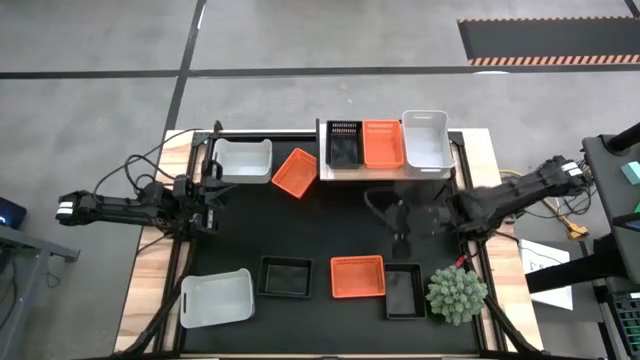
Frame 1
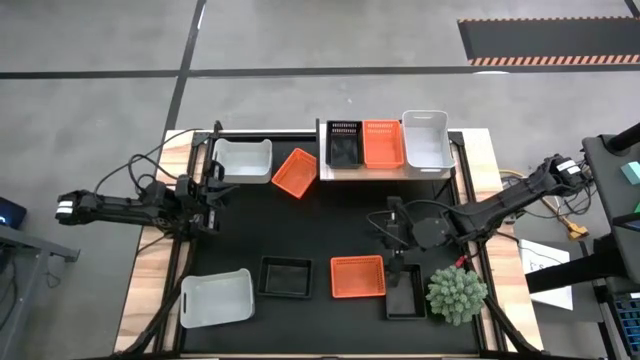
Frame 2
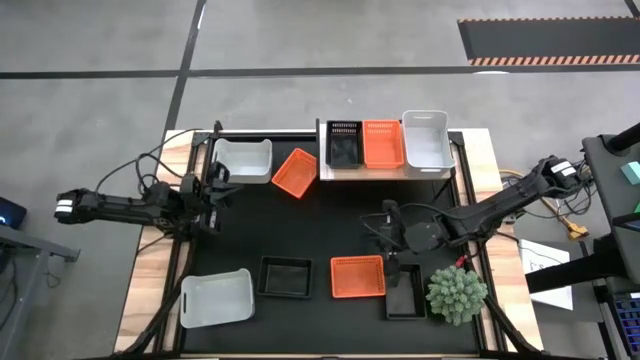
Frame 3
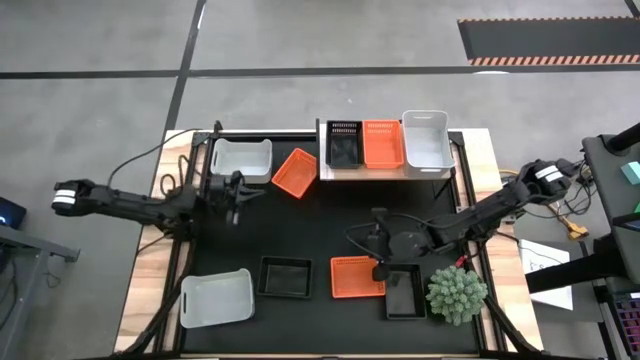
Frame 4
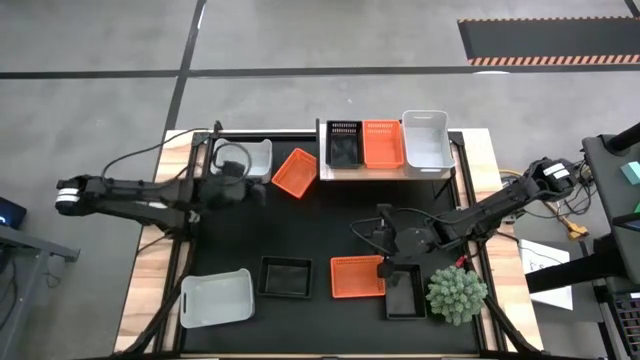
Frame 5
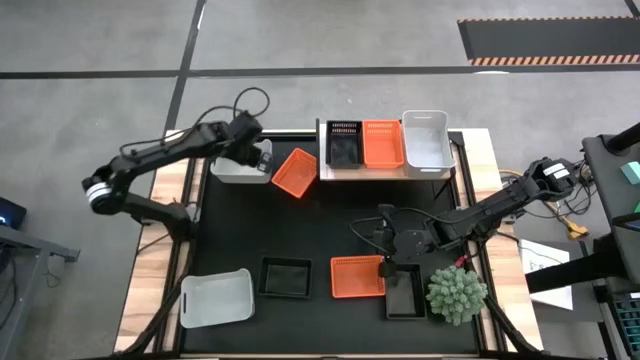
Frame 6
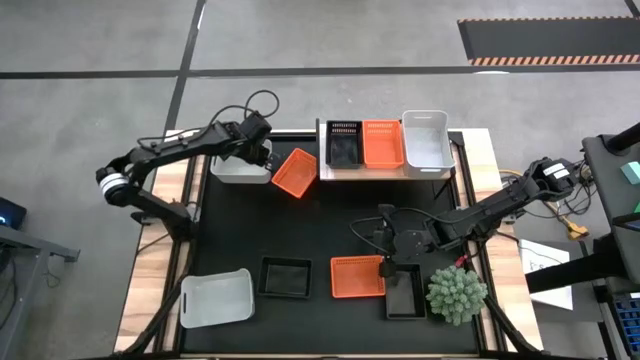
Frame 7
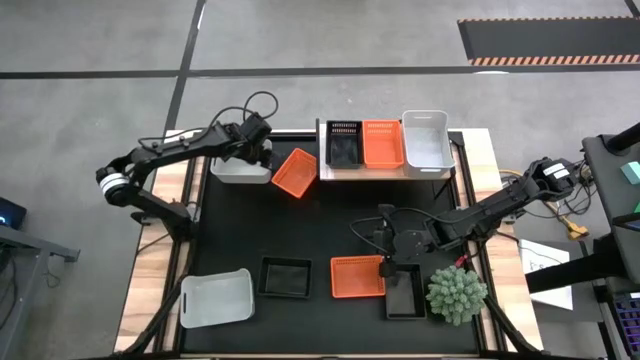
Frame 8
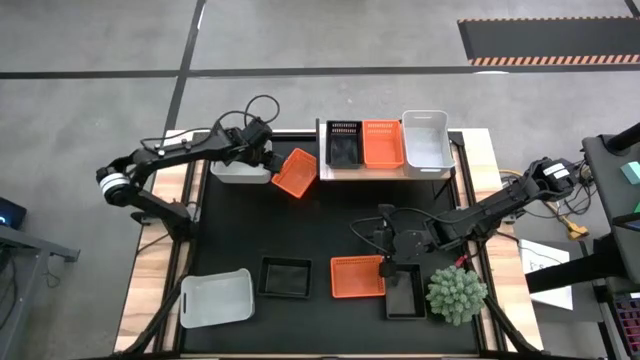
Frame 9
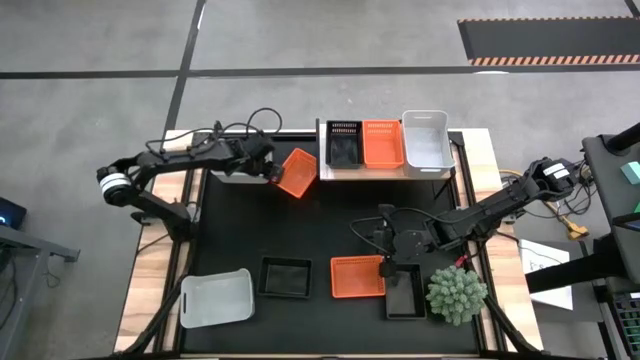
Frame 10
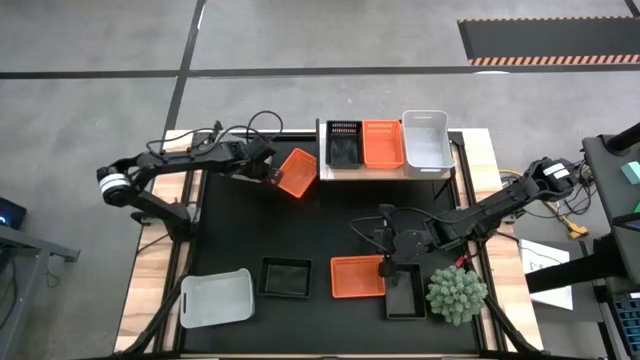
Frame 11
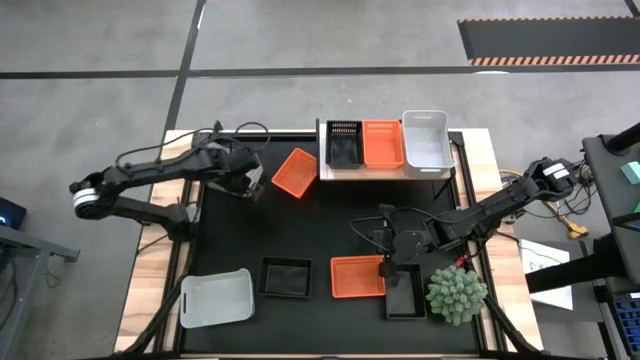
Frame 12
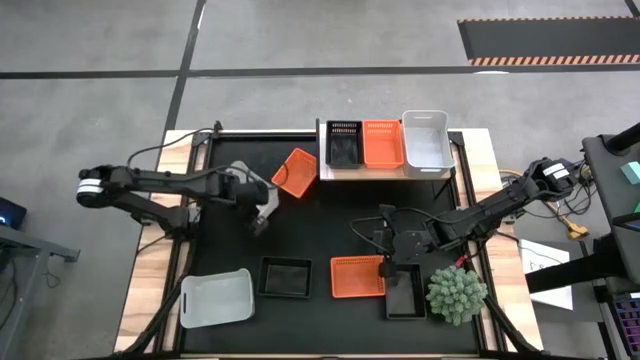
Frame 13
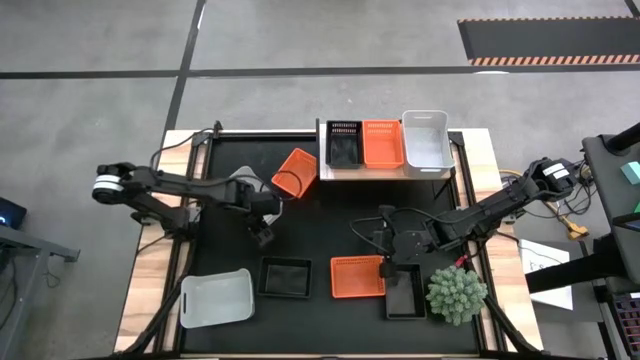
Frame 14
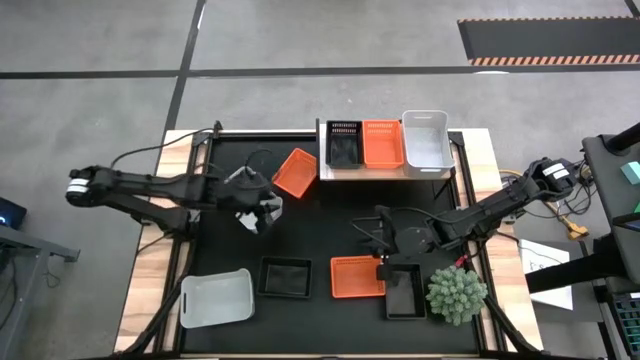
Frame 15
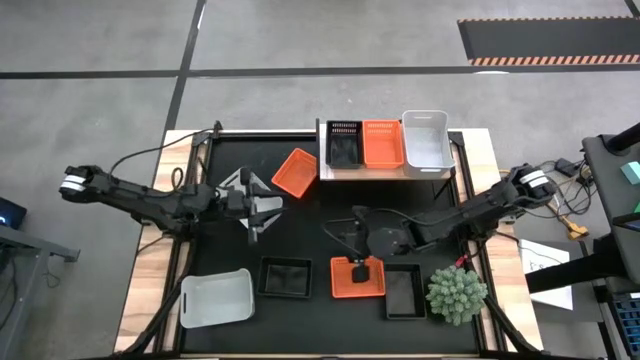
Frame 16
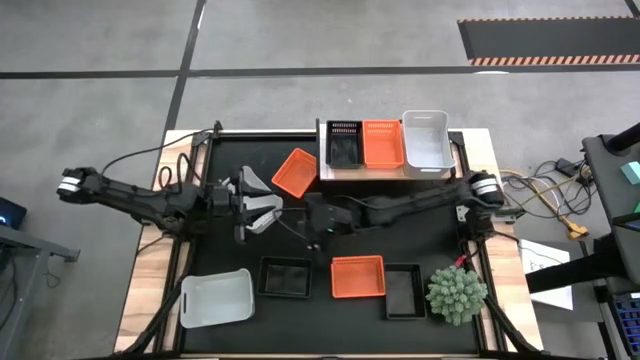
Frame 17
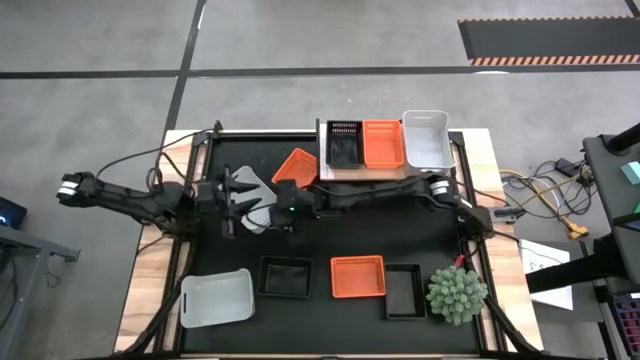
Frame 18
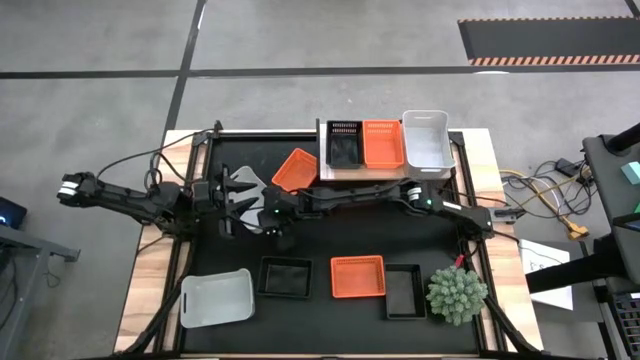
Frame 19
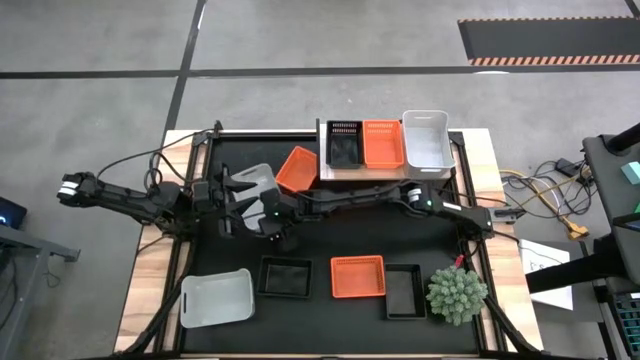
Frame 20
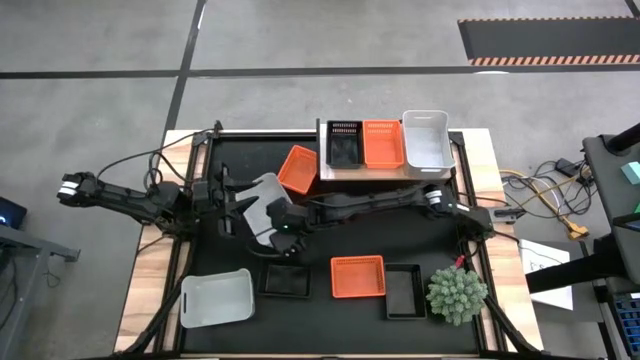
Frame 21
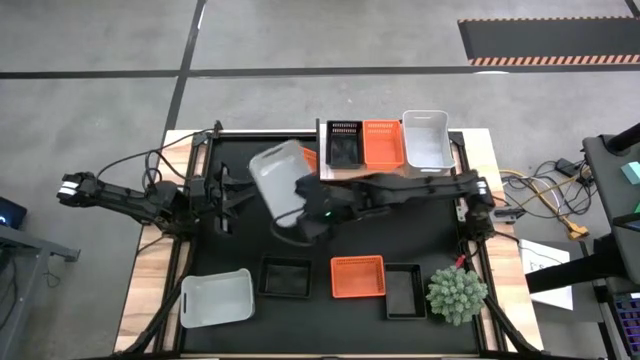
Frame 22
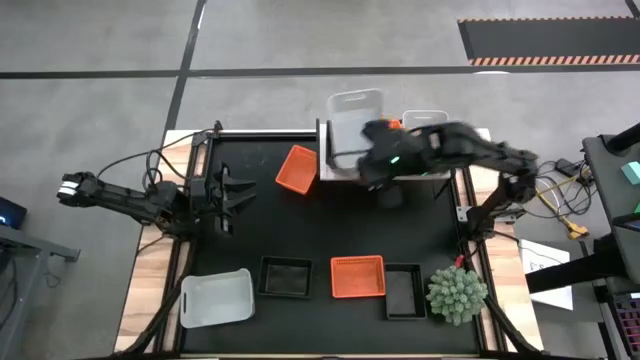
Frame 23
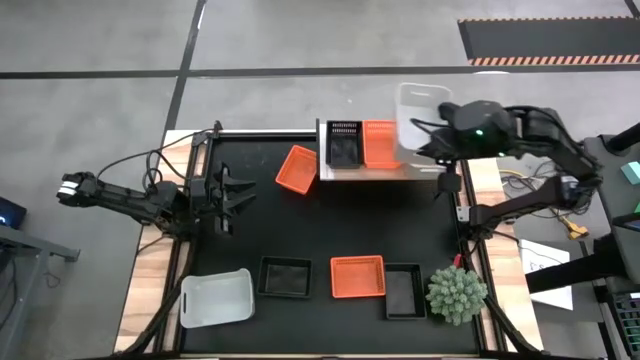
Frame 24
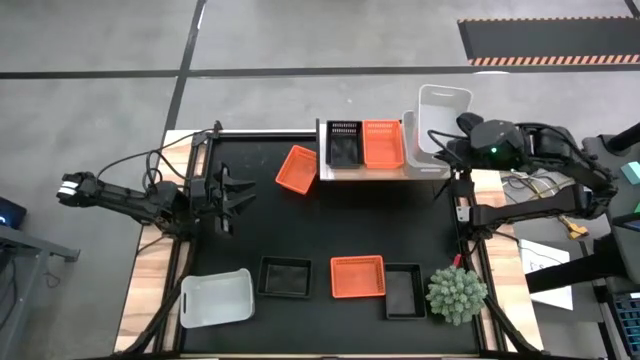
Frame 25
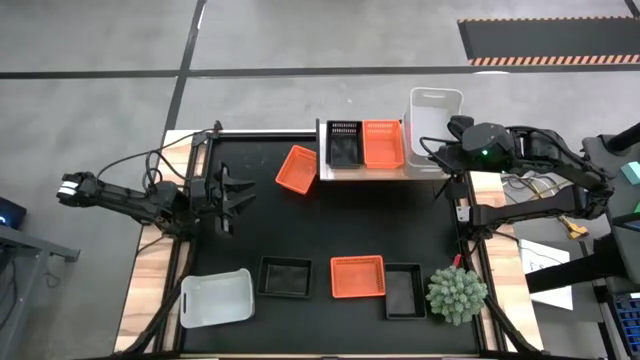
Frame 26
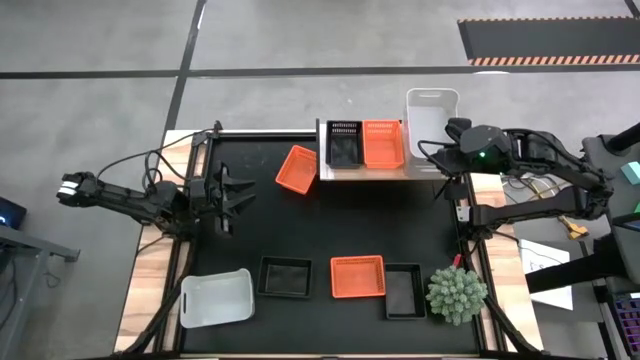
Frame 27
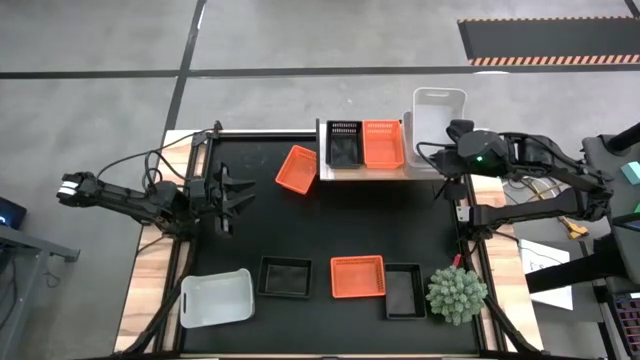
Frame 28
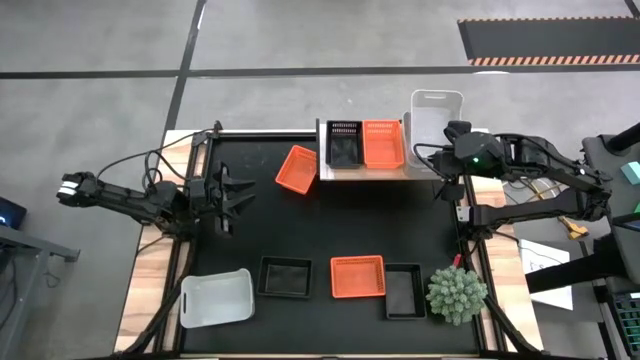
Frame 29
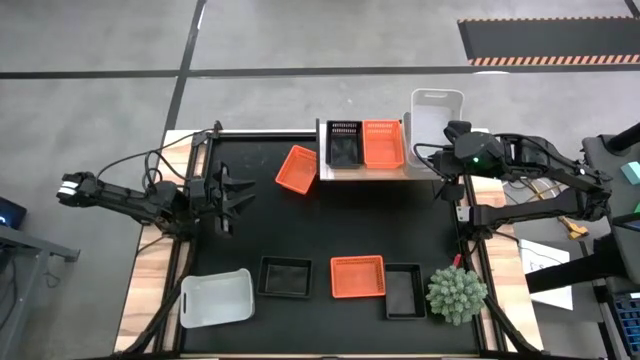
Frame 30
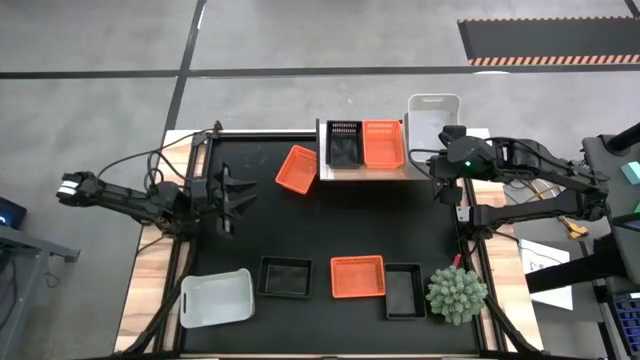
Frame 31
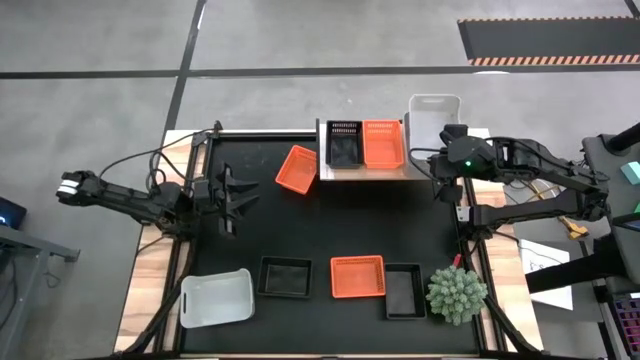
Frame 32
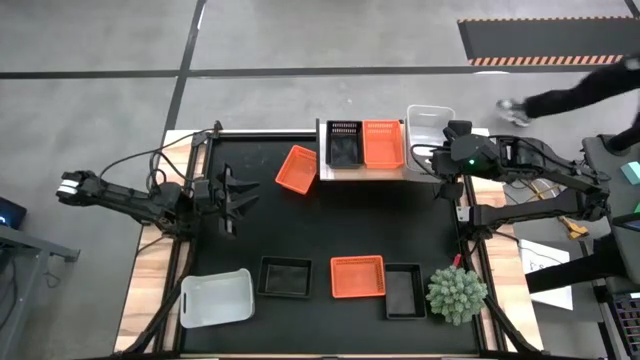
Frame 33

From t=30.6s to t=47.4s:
Stack the top white bin on the white bin on the shelf

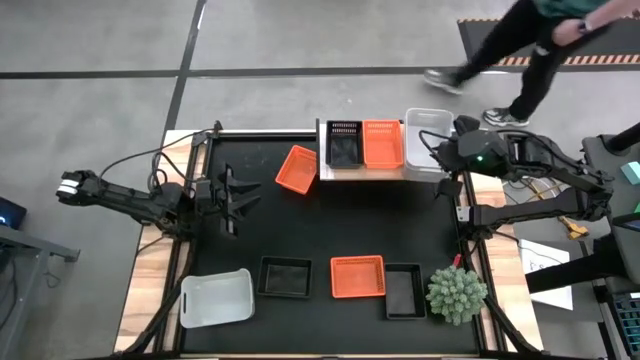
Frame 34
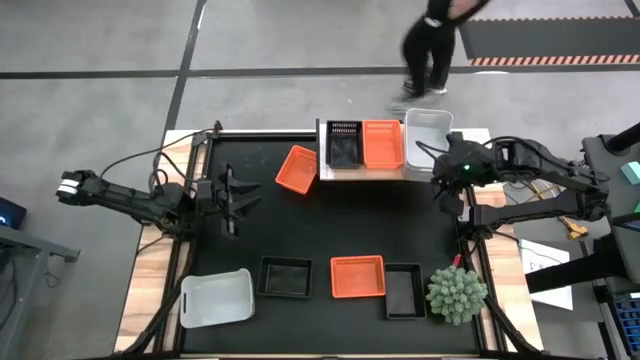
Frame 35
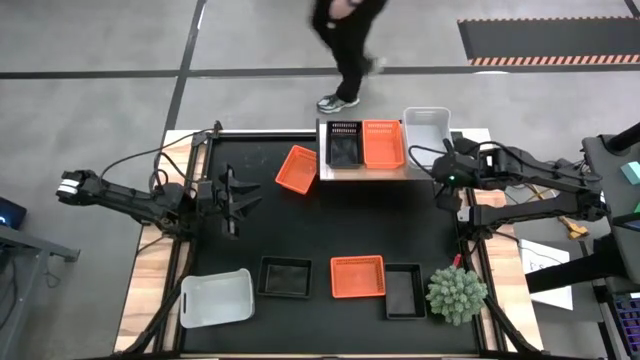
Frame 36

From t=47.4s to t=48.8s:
Adjust the white bins on the shelf

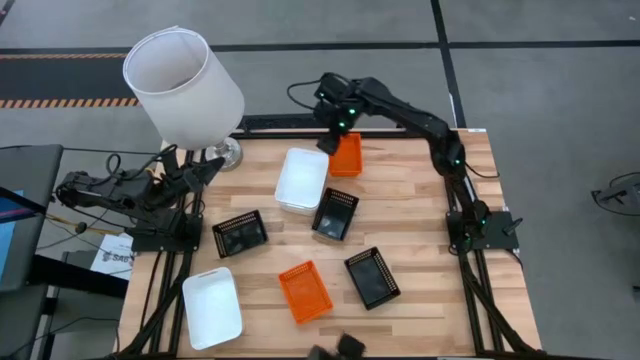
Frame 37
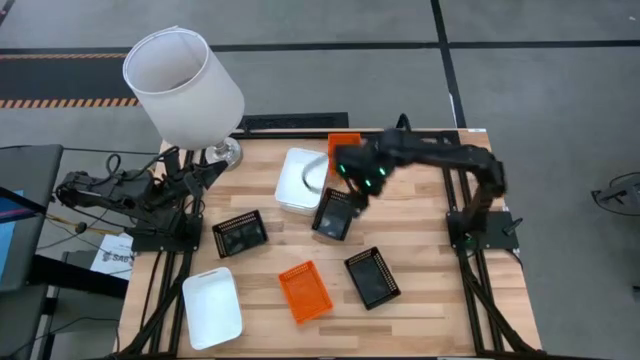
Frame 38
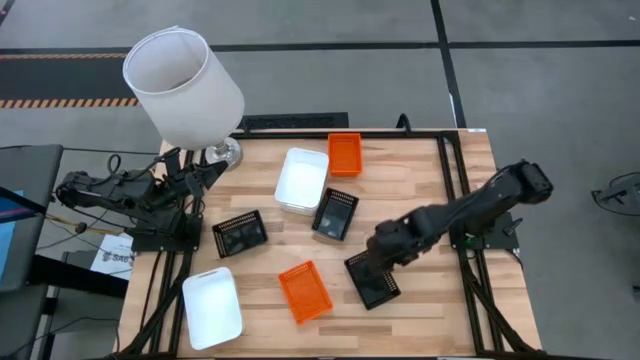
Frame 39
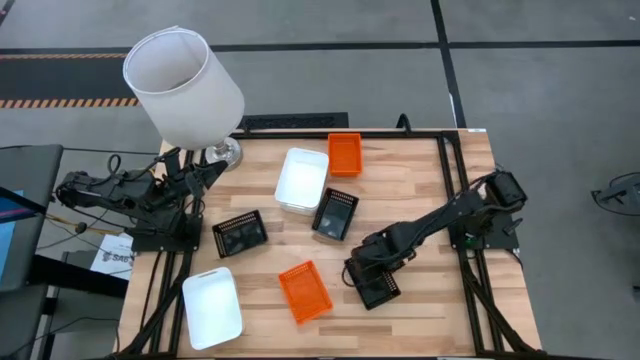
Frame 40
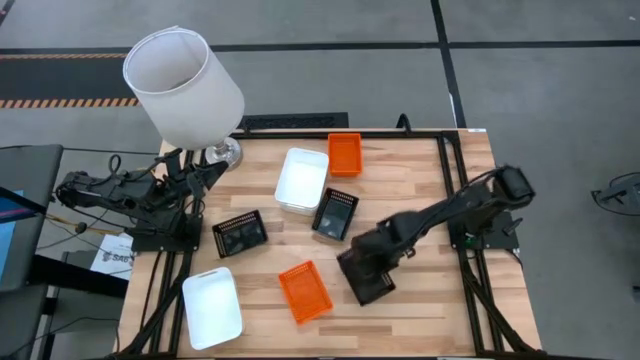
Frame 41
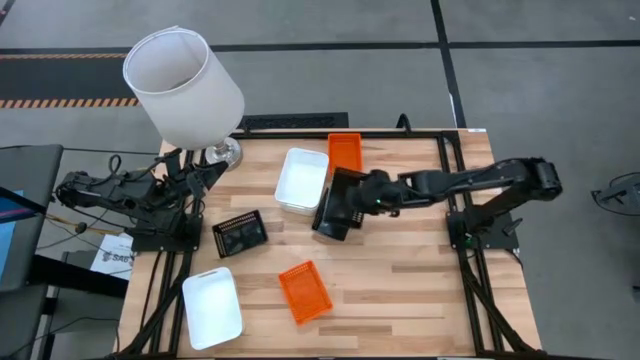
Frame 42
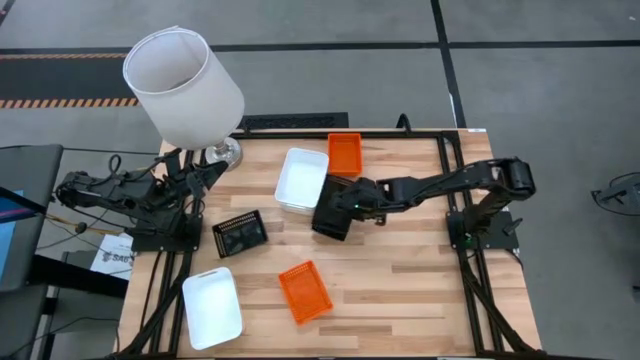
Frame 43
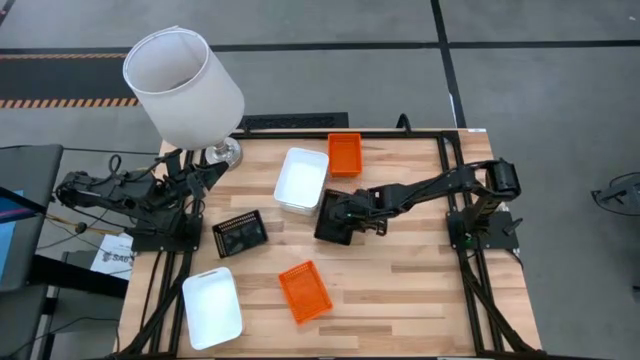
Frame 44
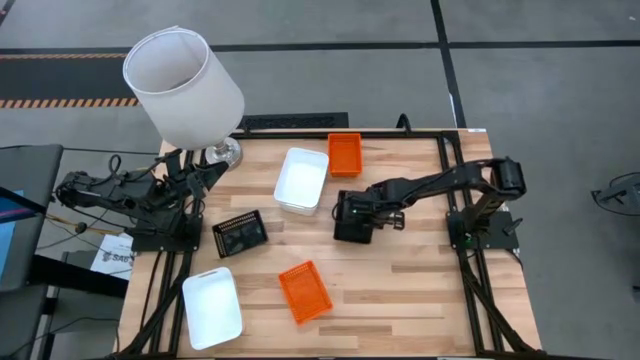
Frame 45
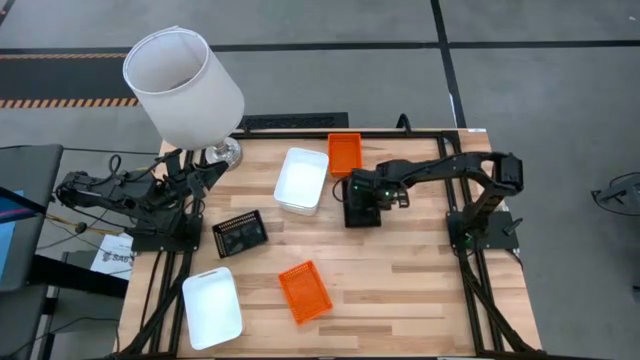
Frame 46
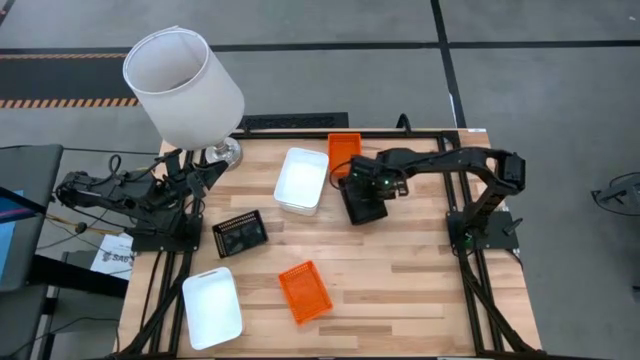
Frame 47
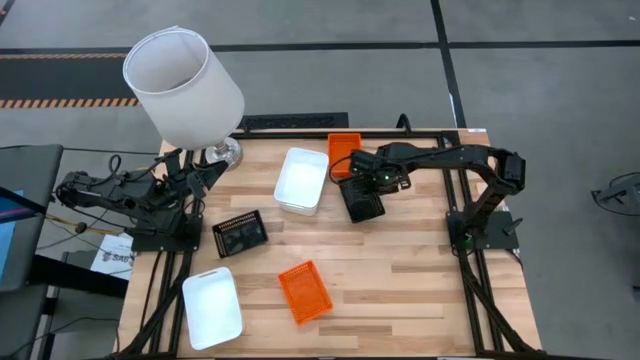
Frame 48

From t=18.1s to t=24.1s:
Stack the right black bin on the middle black bin
